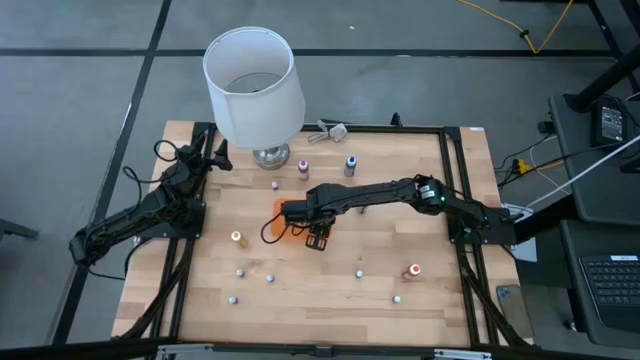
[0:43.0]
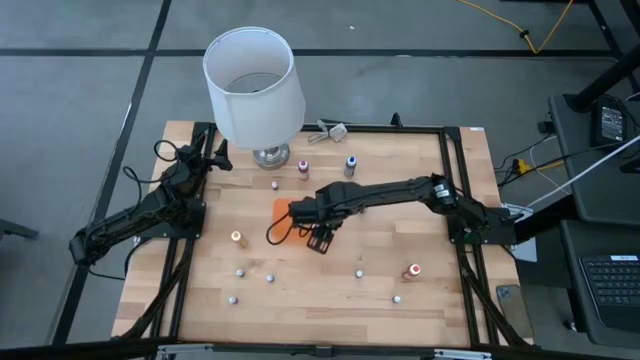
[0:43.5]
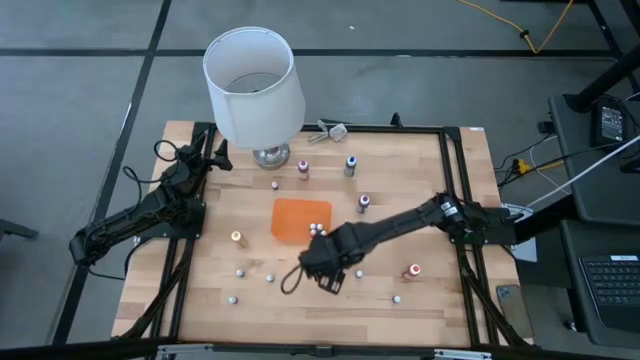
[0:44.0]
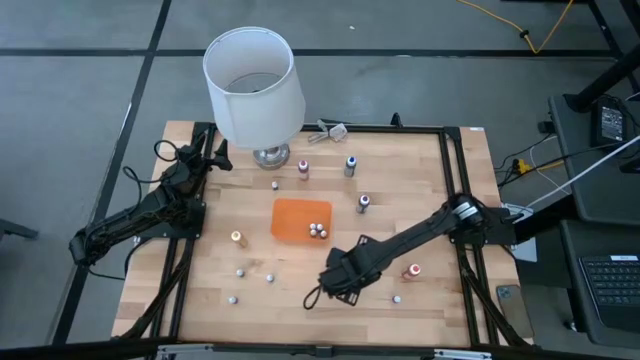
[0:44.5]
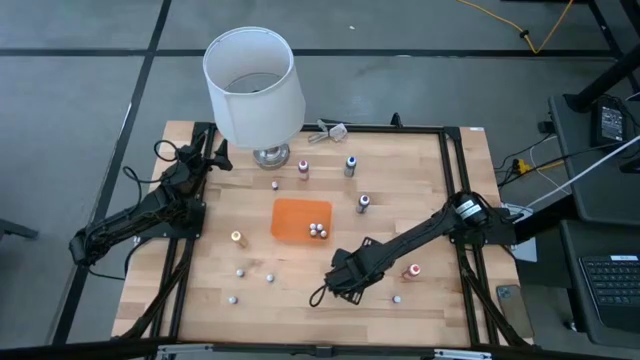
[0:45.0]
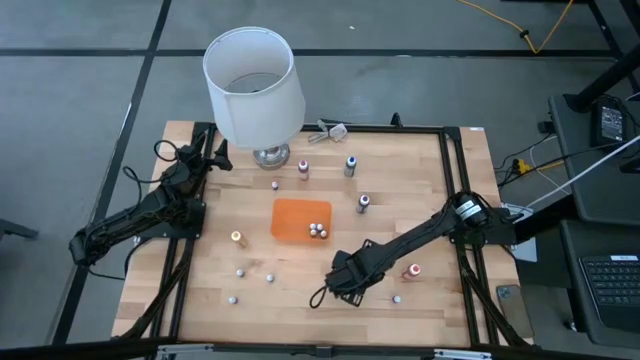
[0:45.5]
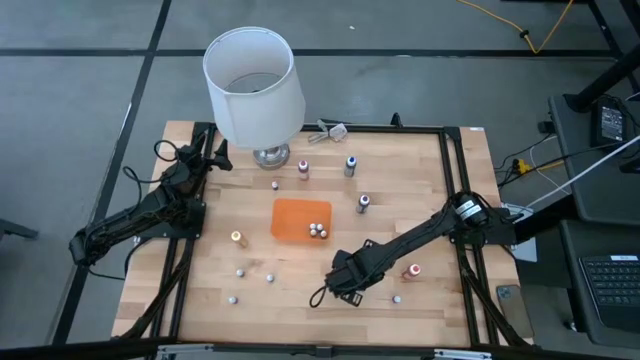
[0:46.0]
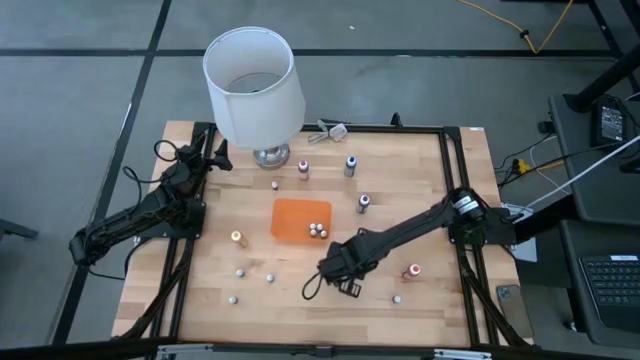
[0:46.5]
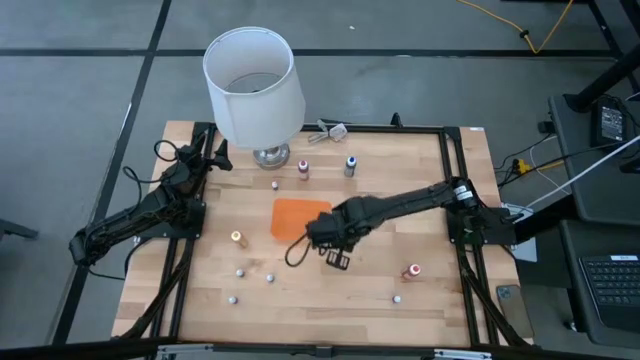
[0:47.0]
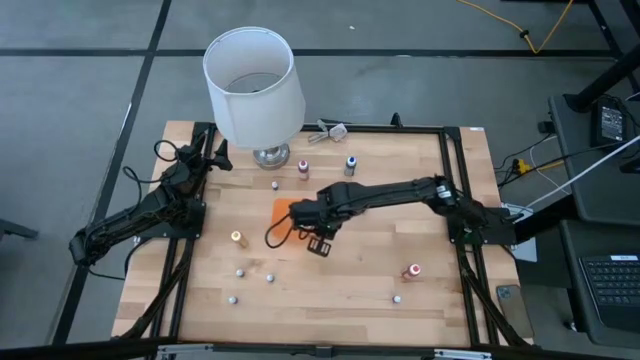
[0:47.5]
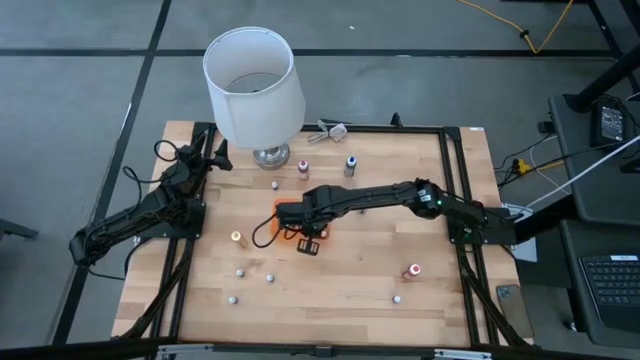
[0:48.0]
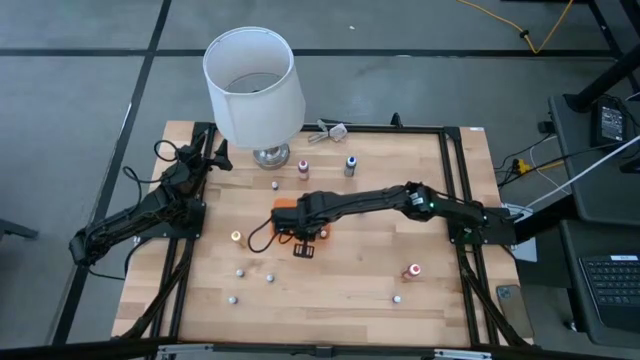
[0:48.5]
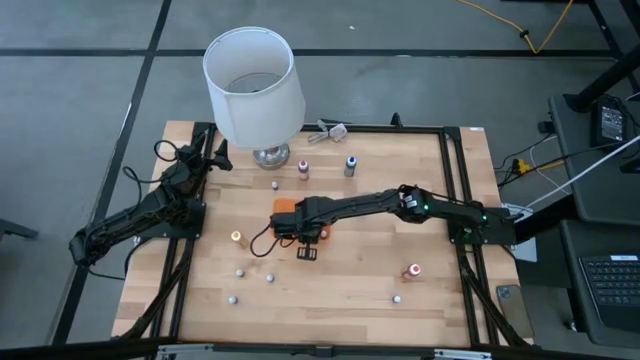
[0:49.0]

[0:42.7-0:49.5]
Task: Pick & Place food coloring
Put the small green food coloring bottle into the orange bin

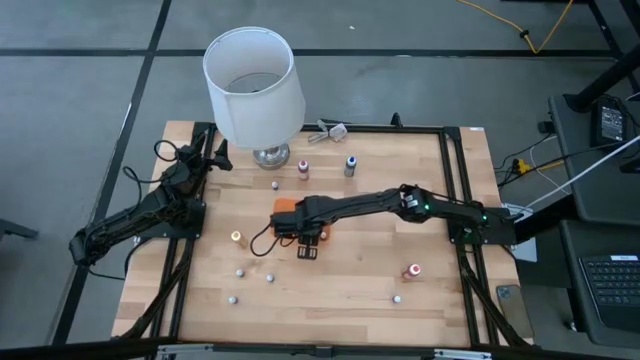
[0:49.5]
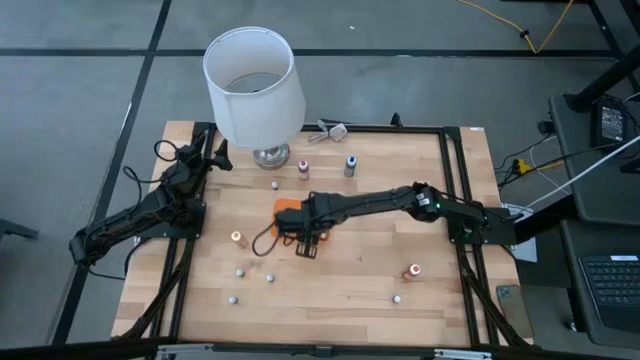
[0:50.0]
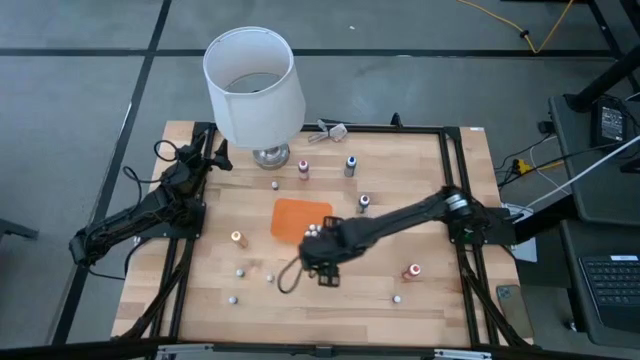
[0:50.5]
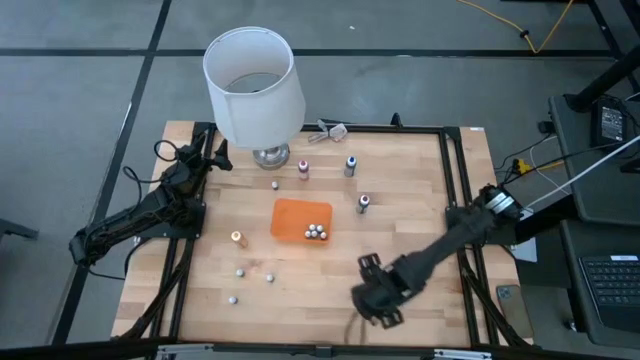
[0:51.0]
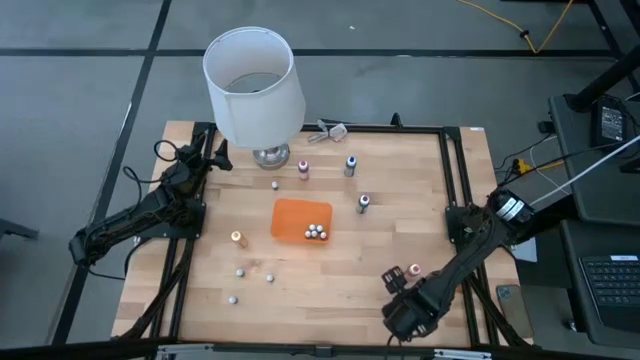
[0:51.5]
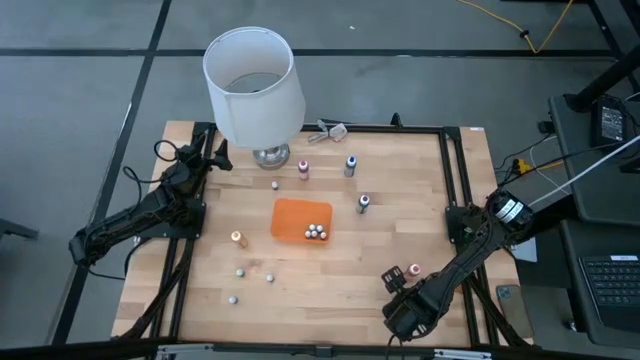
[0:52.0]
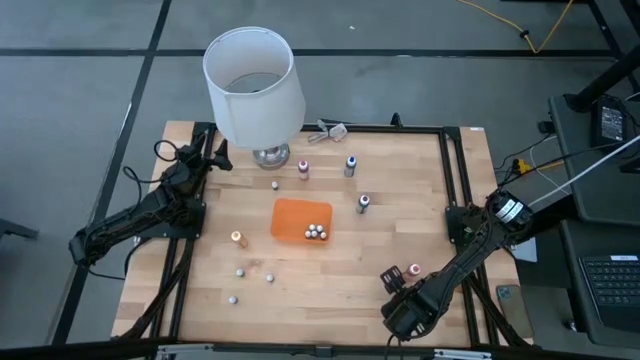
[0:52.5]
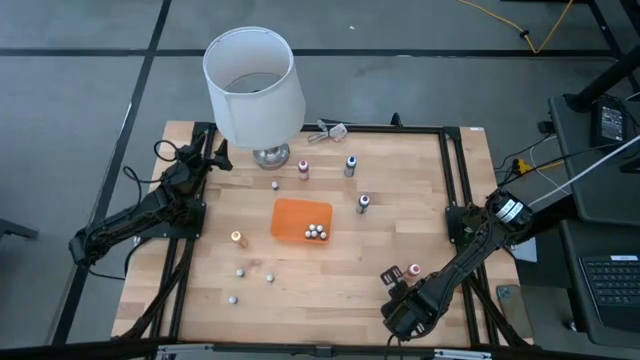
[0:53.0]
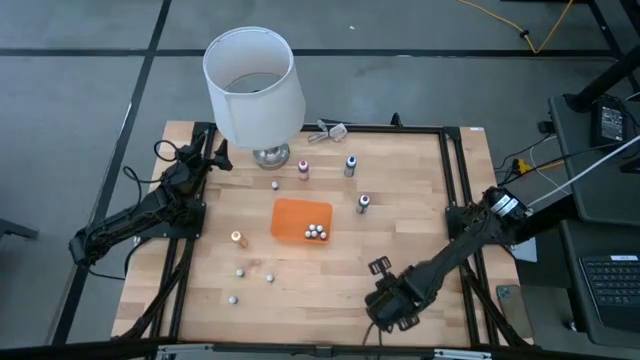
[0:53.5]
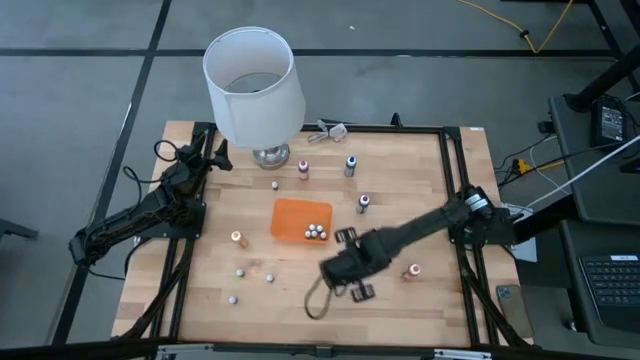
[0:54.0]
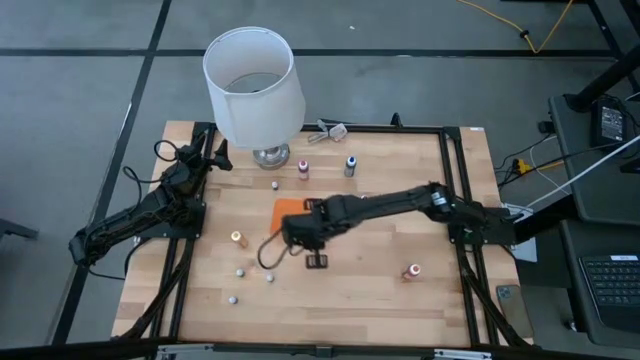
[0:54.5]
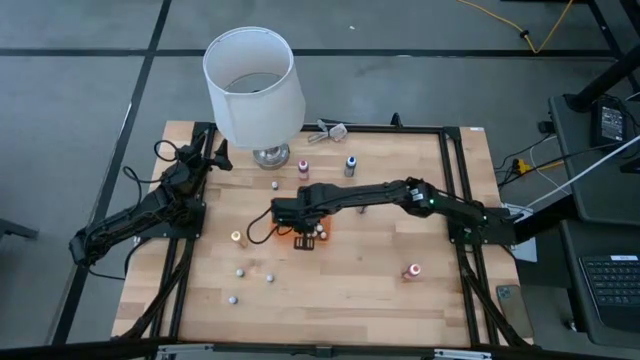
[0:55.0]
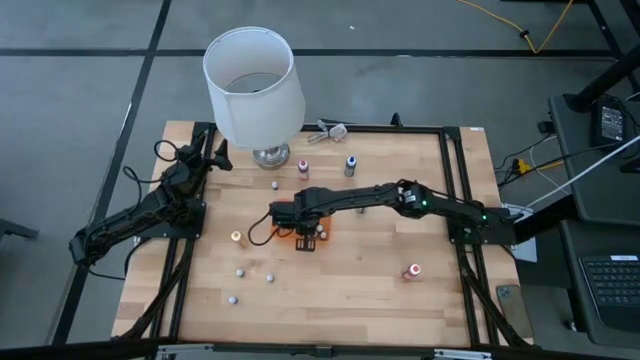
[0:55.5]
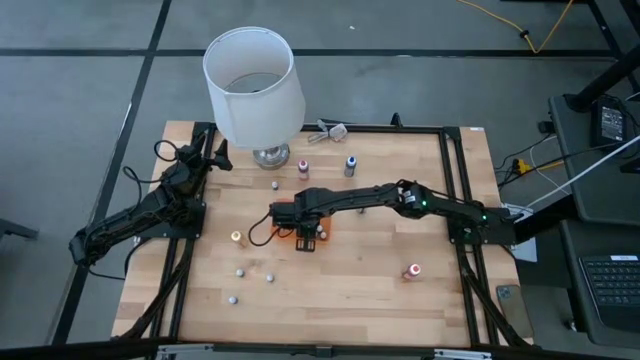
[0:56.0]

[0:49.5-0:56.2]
Put the small red food coloring bottle into the orange bin

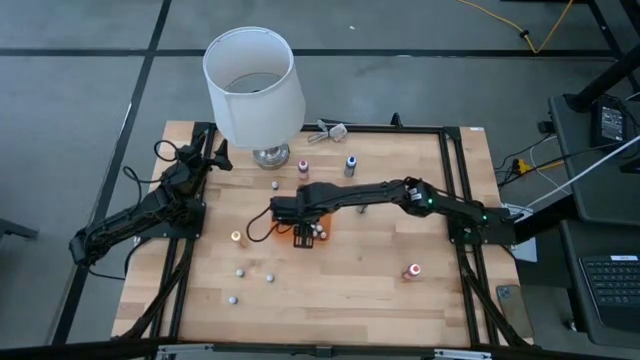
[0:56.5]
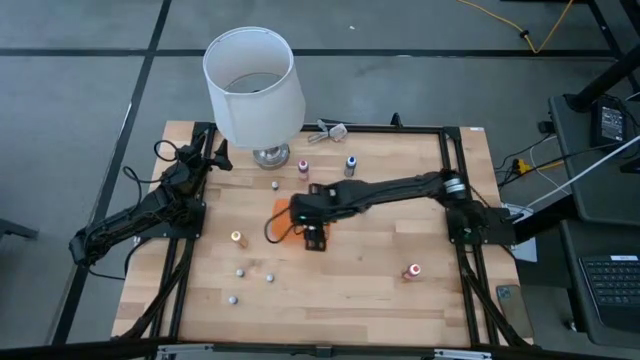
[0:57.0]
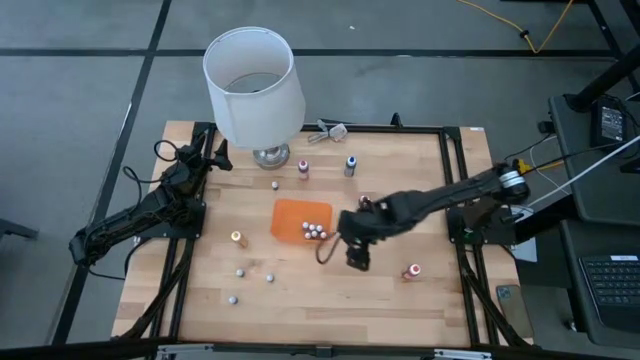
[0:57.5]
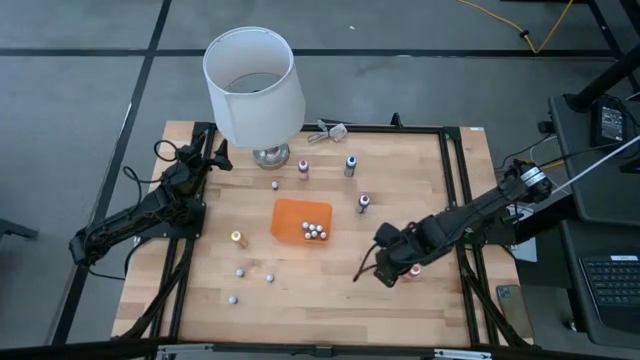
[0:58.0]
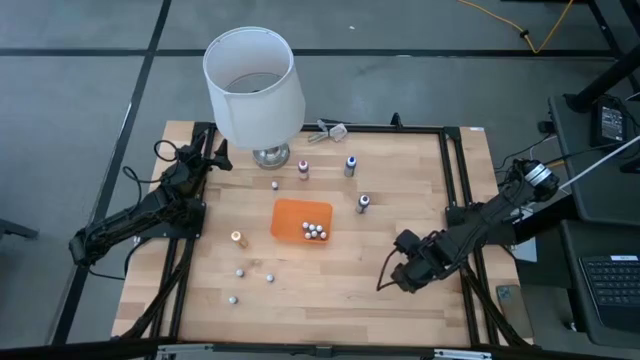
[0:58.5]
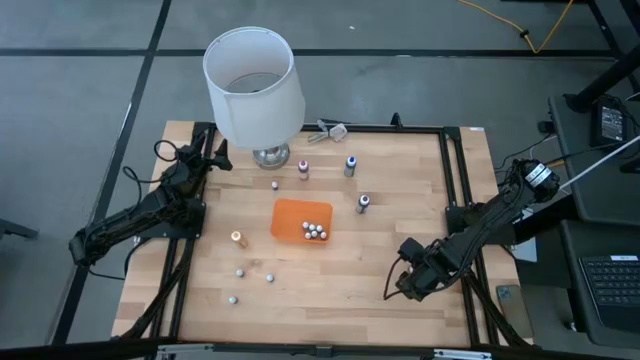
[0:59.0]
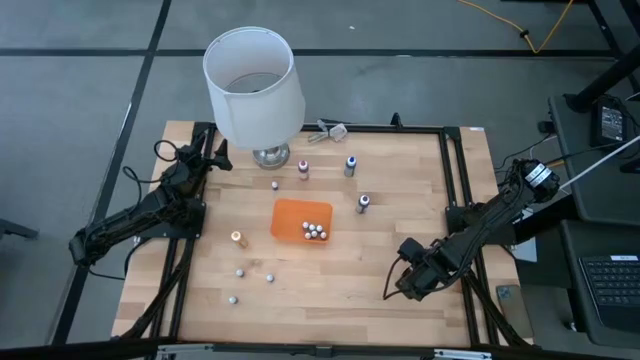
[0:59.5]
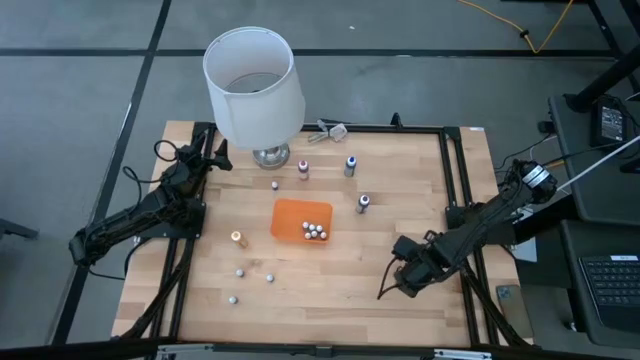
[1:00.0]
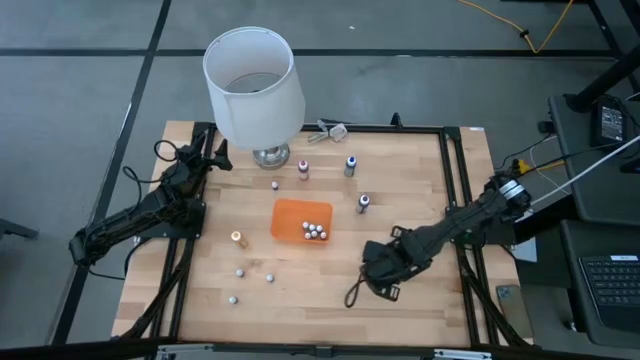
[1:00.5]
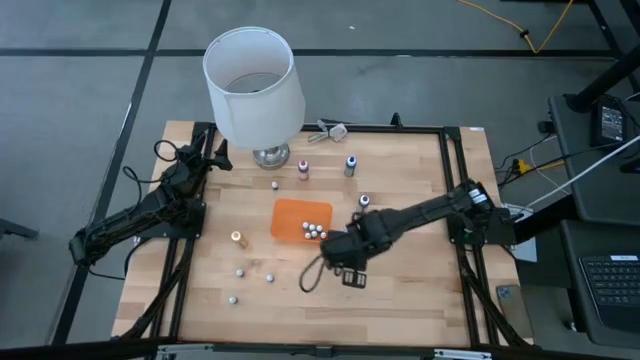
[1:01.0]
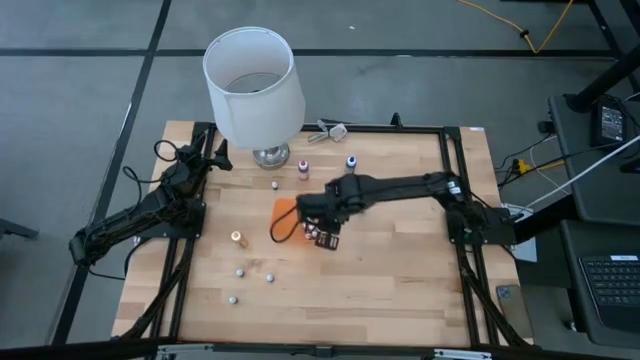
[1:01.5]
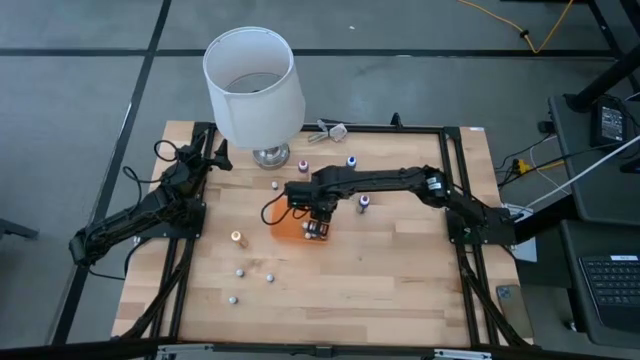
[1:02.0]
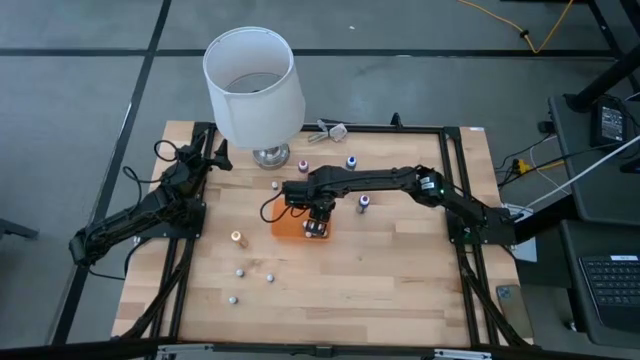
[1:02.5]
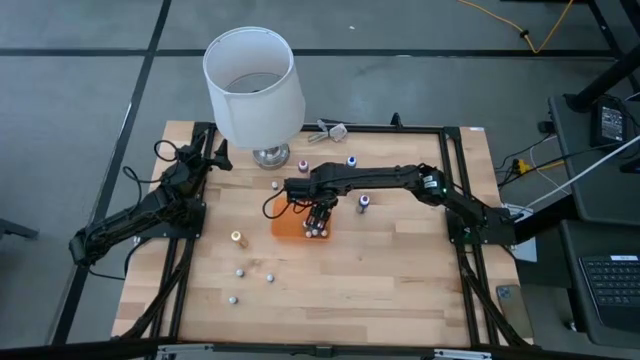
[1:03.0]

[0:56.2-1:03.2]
Put the big orange food coloring bottle into the orange bin

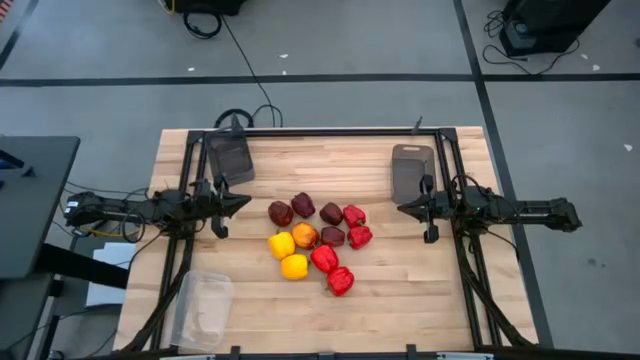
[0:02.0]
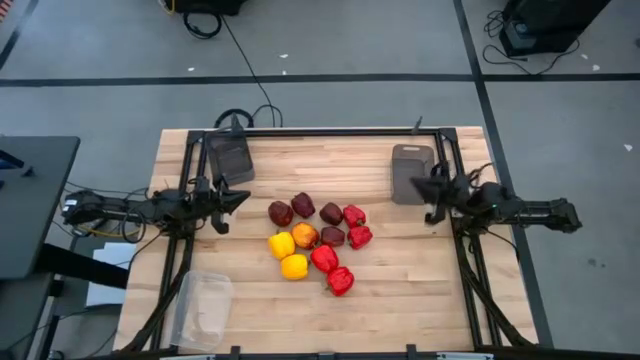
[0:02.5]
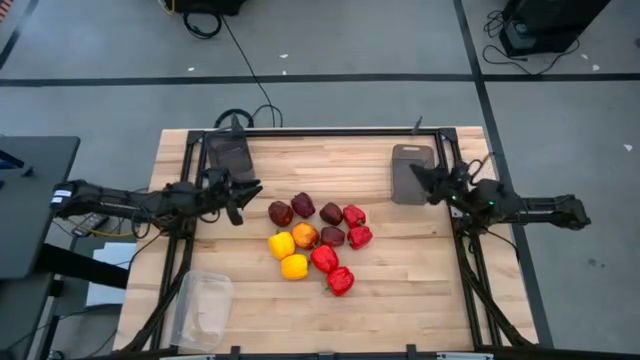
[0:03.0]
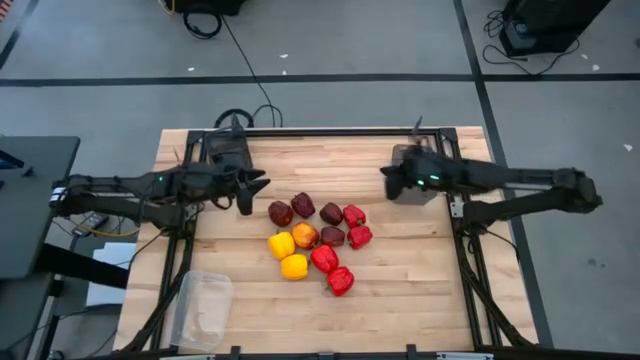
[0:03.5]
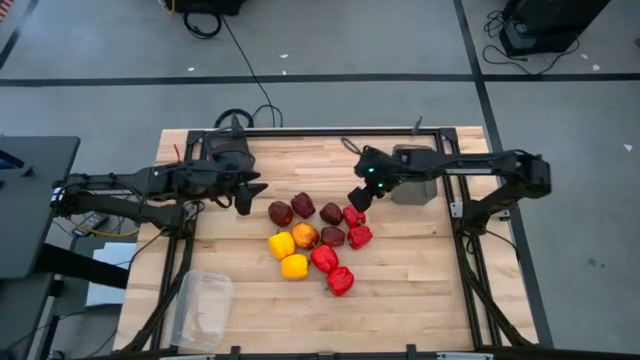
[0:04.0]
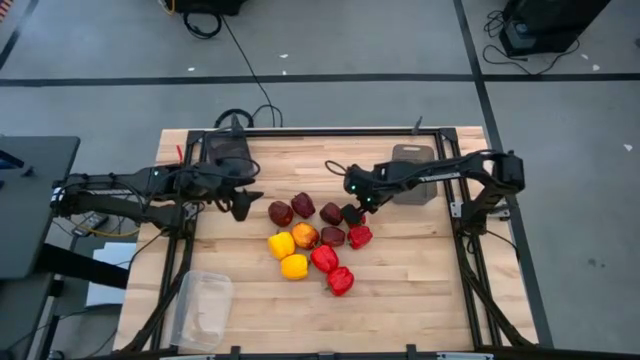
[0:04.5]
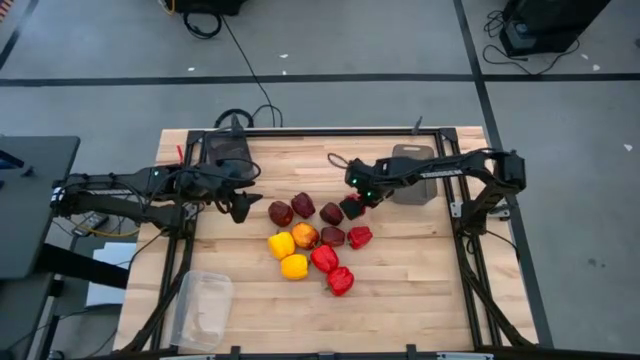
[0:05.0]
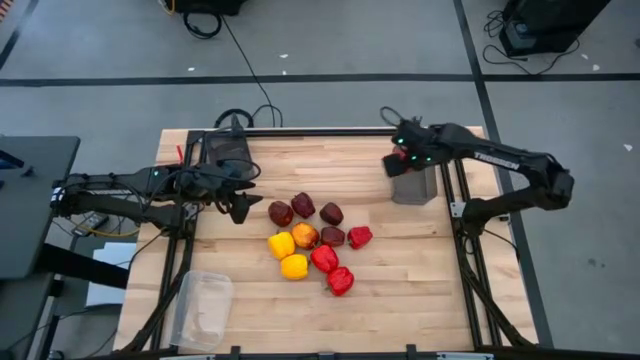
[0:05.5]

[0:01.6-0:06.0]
Task: Sort produce into baskets
Put the red bell pepper into the right black bin
